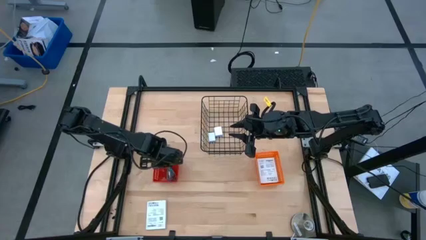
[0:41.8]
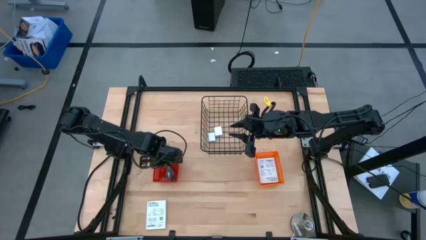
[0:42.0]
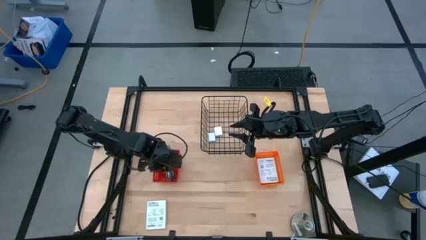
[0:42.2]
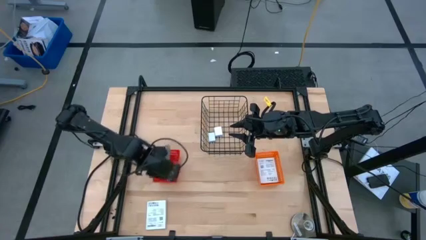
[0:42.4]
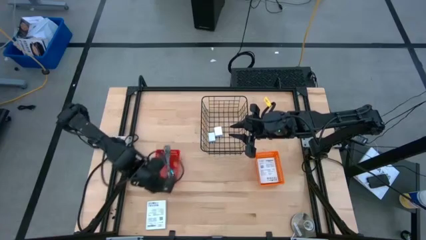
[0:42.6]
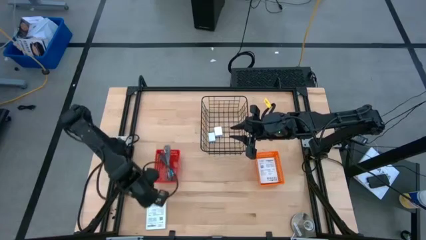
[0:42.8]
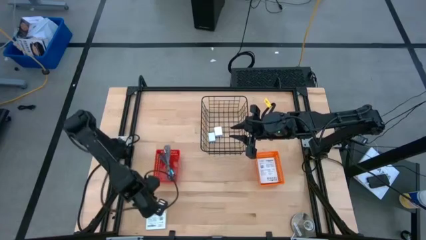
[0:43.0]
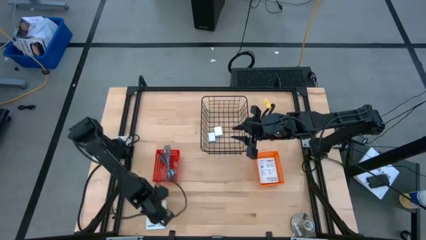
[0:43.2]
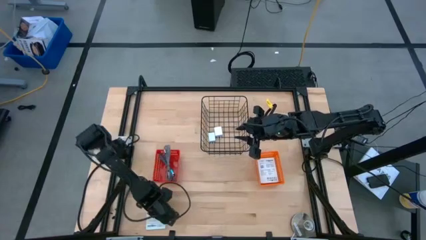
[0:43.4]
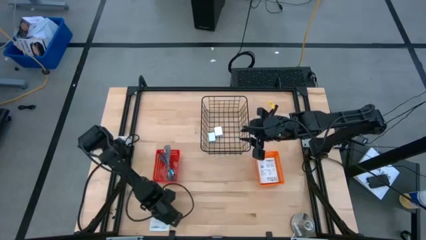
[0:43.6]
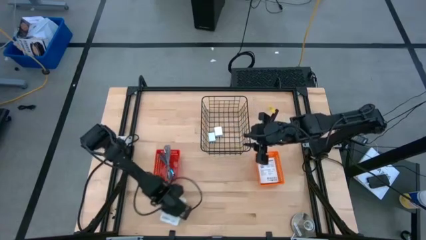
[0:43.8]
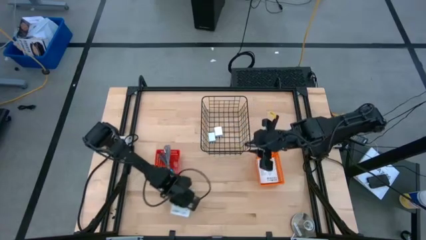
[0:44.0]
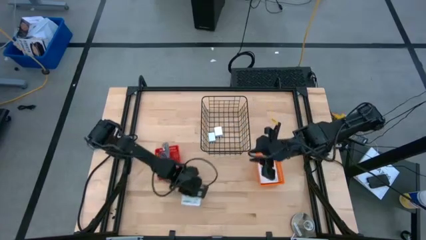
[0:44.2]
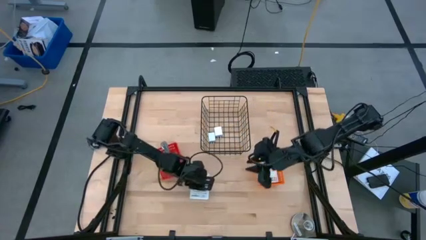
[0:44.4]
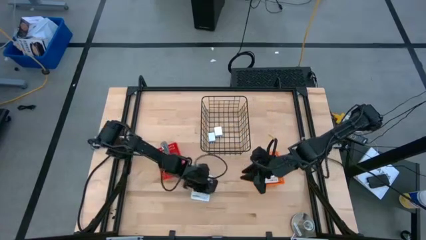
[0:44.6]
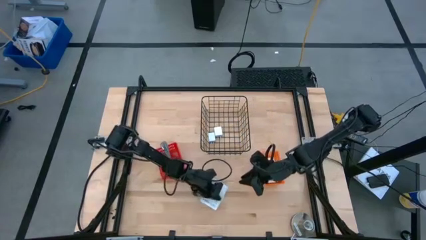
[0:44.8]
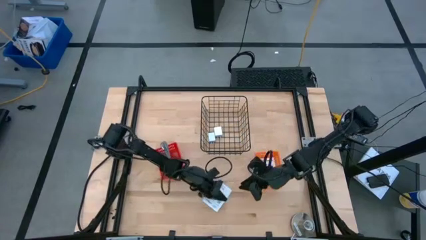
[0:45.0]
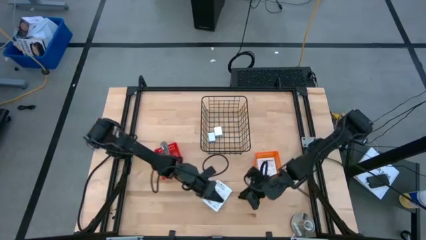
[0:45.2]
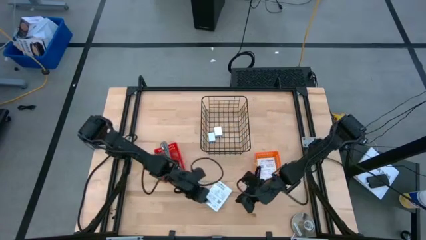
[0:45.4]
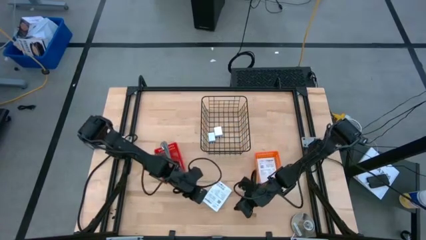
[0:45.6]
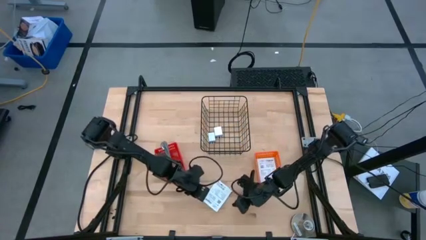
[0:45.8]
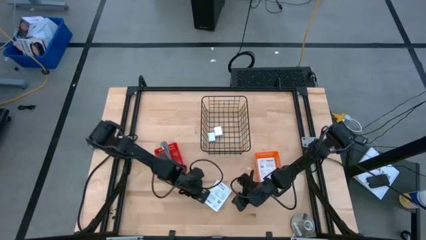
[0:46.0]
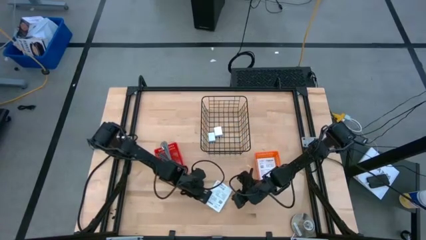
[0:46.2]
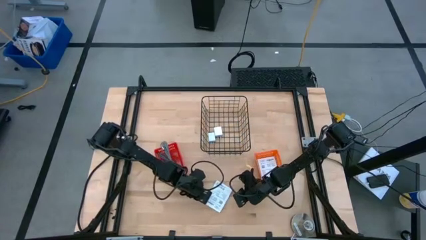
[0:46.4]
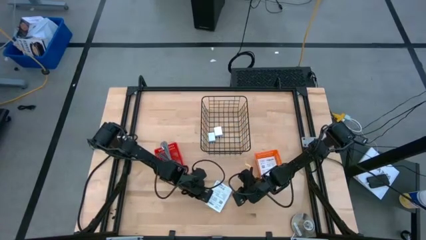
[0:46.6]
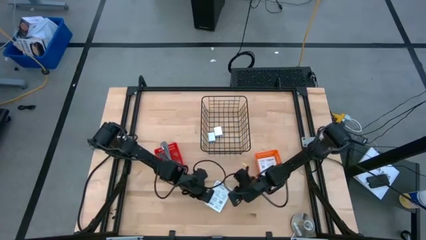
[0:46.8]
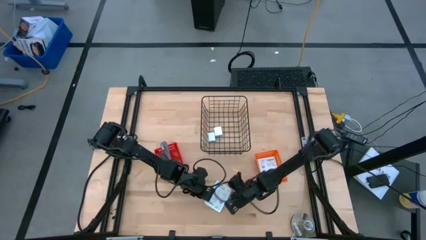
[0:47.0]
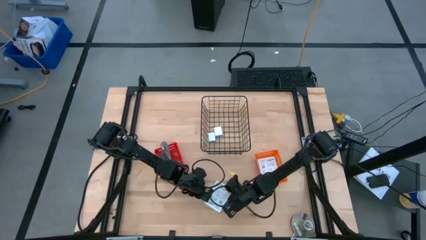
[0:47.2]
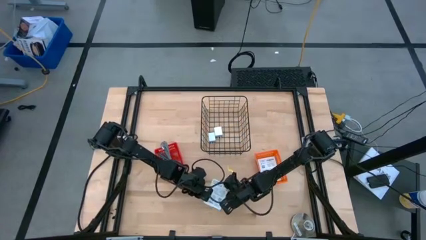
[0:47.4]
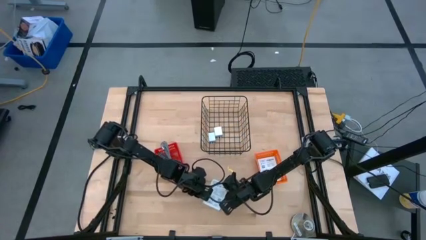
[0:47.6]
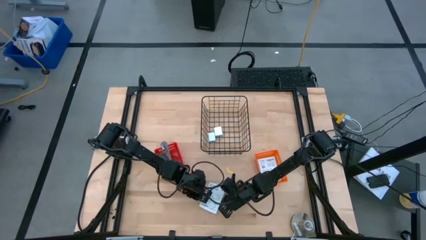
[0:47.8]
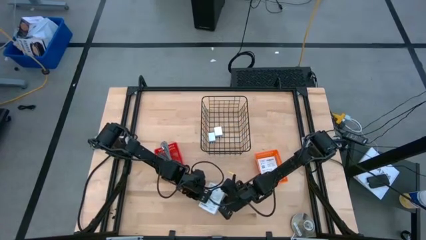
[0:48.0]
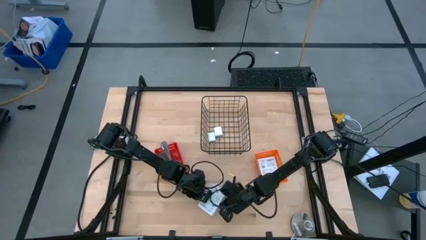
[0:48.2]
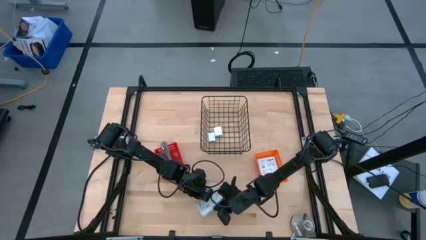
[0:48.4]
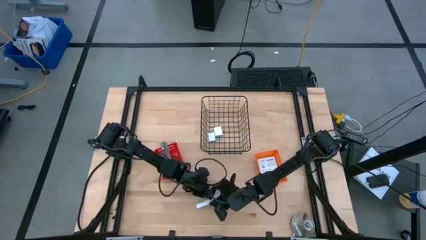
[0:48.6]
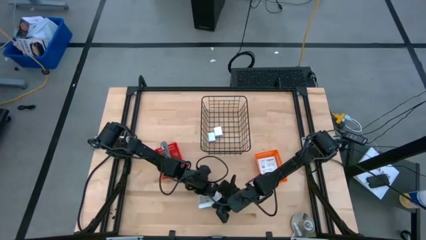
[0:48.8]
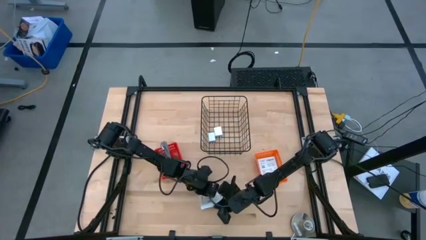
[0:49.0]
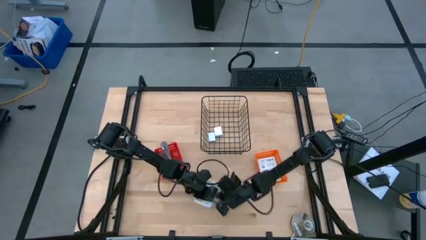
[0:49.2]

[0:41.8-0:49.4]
Task: Pick and place items into bin
Put the white card reader box into the orange bin

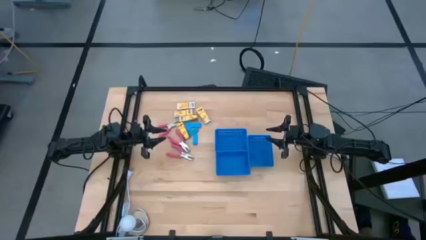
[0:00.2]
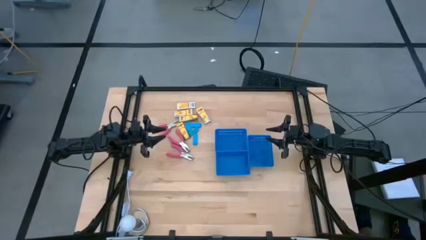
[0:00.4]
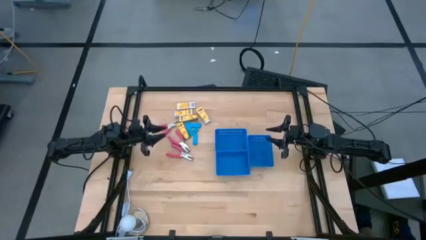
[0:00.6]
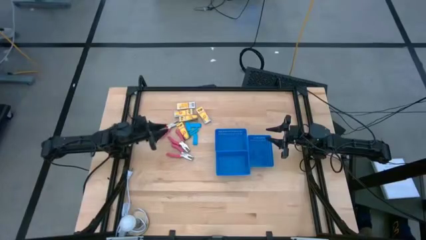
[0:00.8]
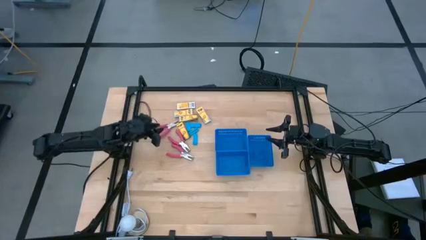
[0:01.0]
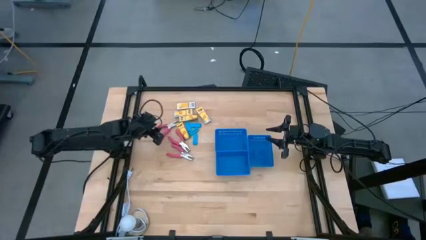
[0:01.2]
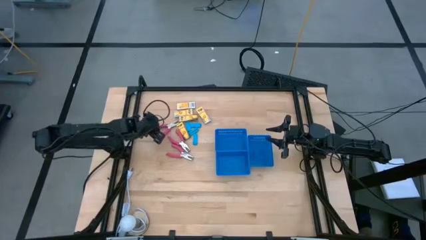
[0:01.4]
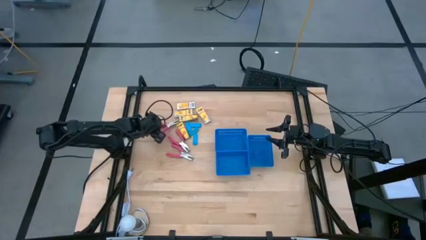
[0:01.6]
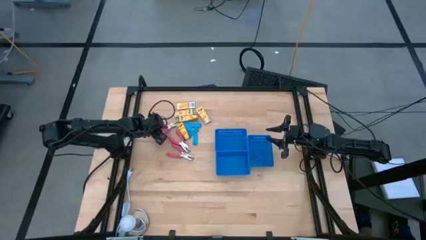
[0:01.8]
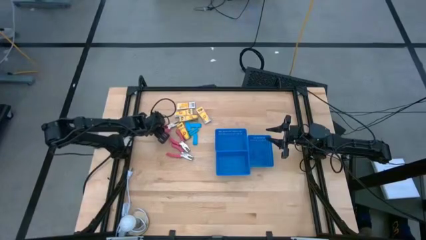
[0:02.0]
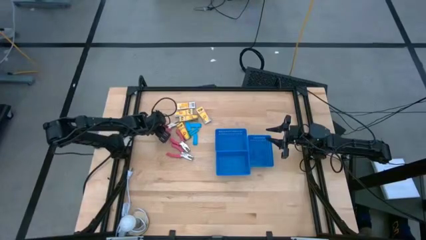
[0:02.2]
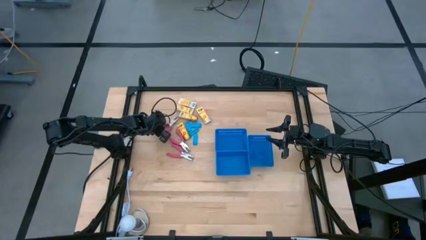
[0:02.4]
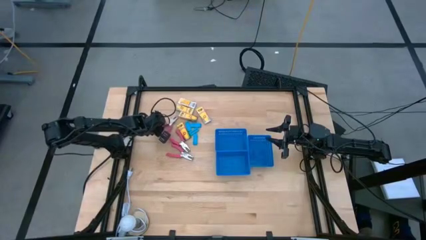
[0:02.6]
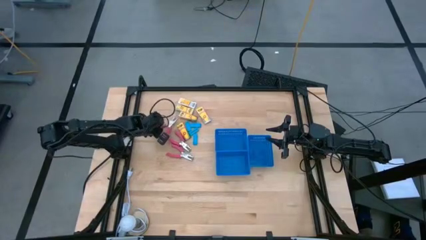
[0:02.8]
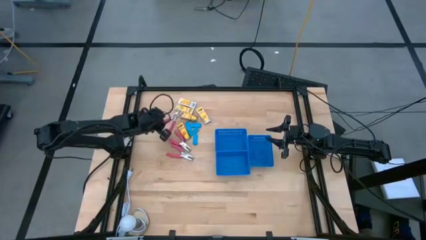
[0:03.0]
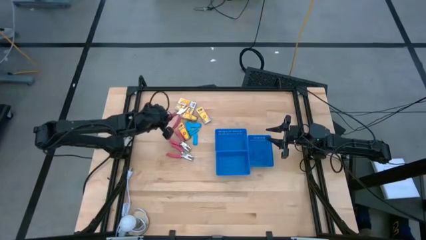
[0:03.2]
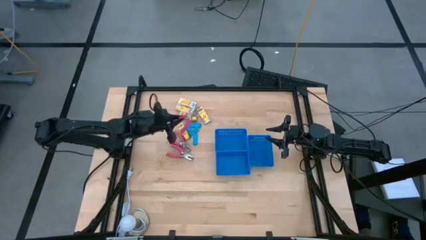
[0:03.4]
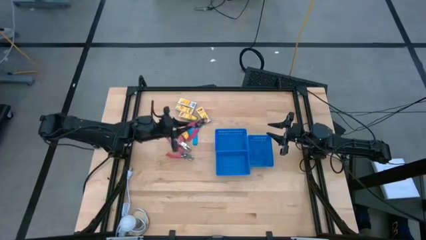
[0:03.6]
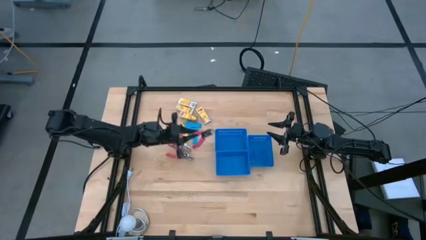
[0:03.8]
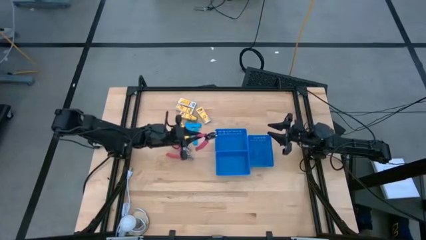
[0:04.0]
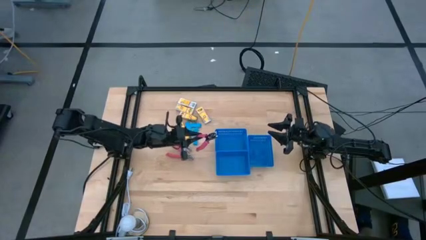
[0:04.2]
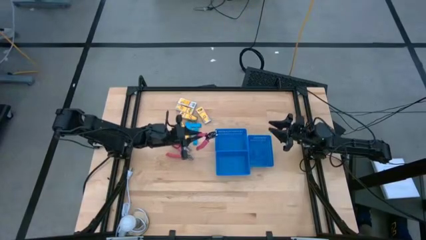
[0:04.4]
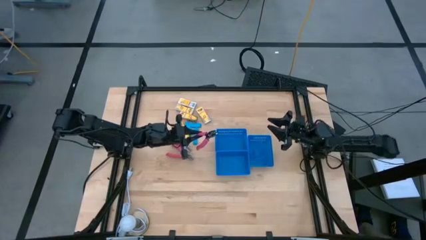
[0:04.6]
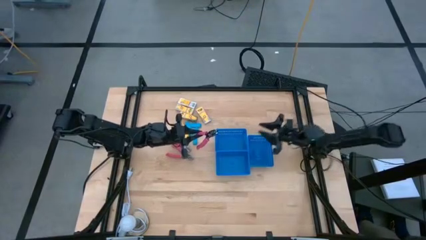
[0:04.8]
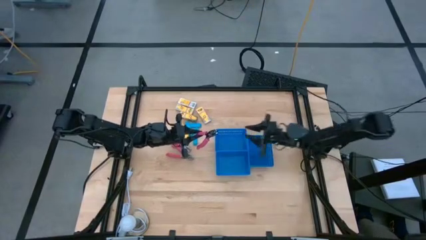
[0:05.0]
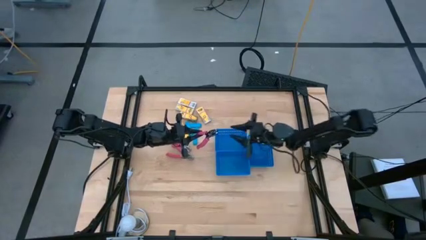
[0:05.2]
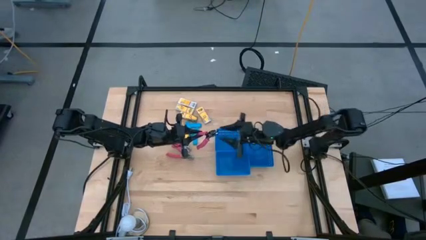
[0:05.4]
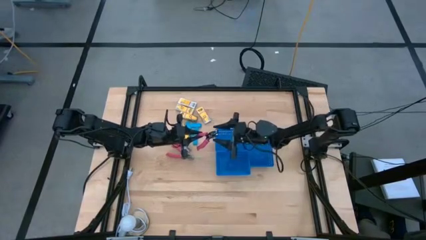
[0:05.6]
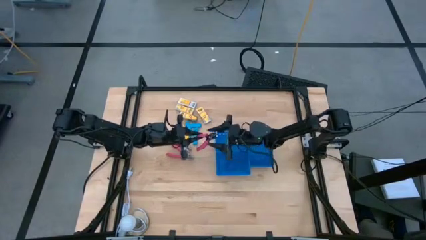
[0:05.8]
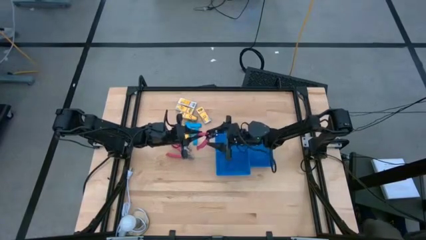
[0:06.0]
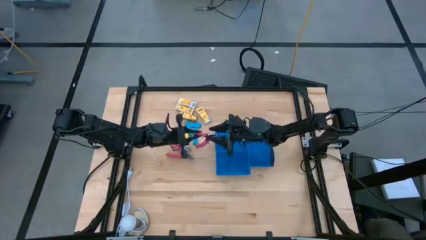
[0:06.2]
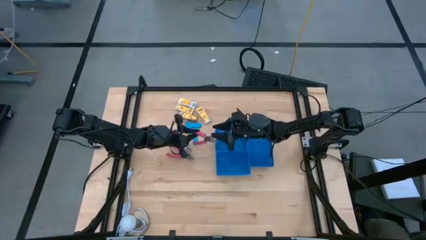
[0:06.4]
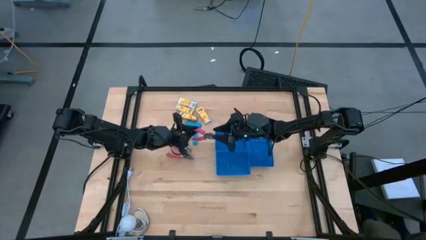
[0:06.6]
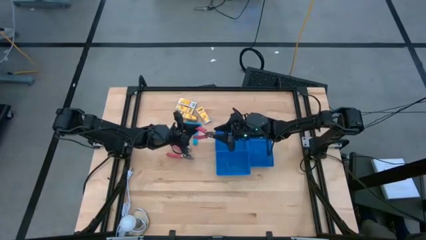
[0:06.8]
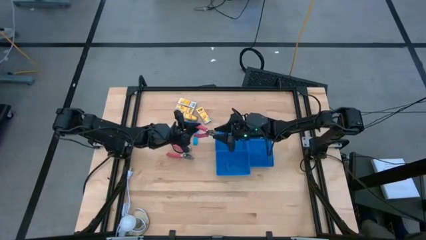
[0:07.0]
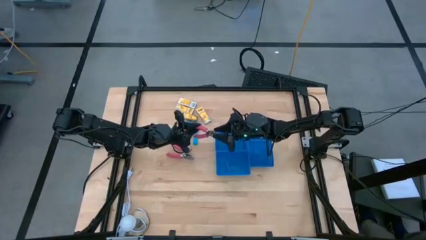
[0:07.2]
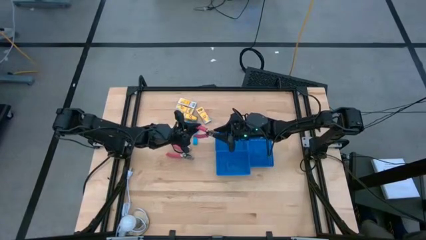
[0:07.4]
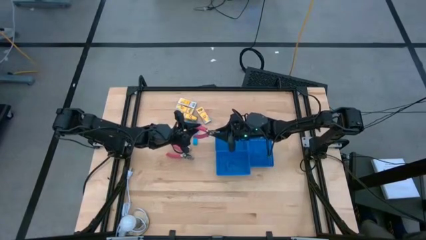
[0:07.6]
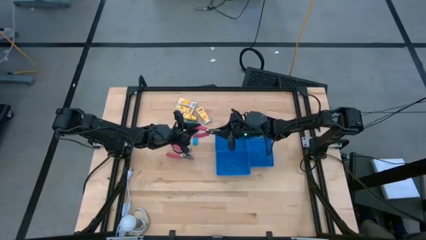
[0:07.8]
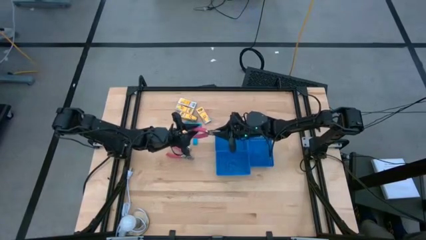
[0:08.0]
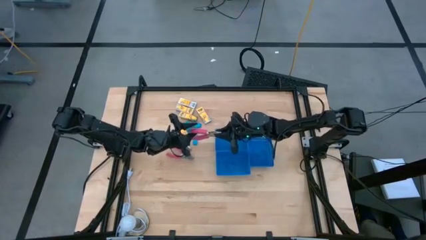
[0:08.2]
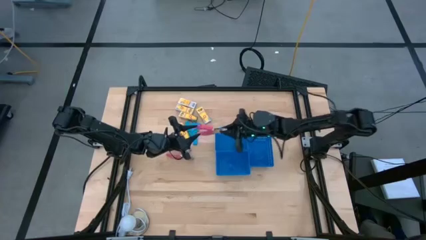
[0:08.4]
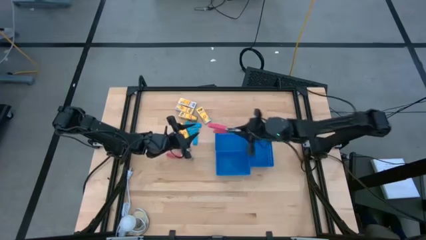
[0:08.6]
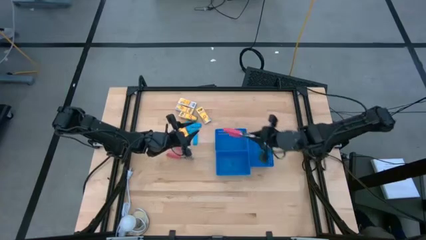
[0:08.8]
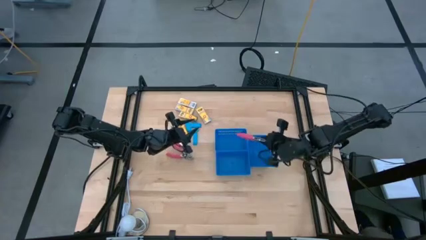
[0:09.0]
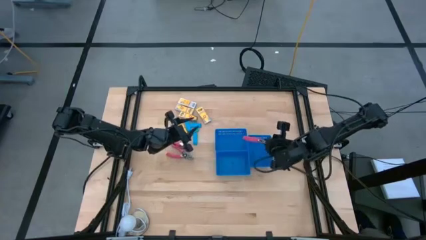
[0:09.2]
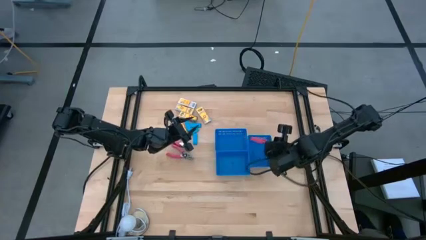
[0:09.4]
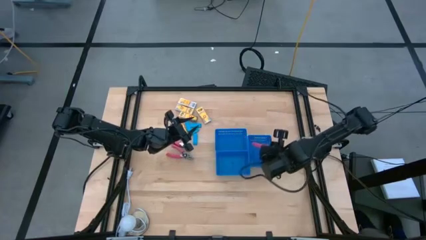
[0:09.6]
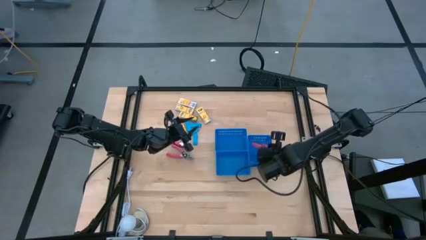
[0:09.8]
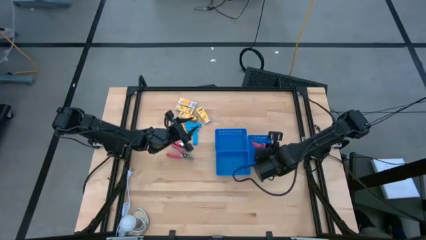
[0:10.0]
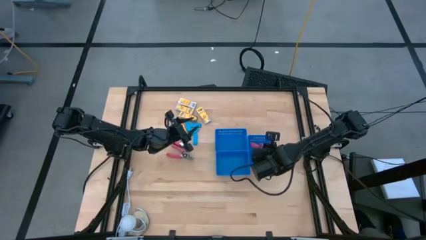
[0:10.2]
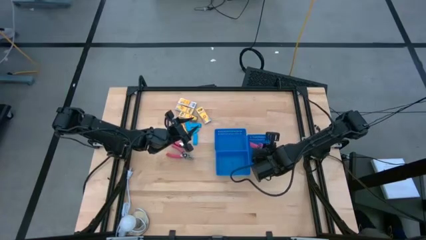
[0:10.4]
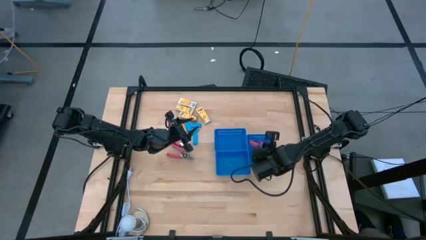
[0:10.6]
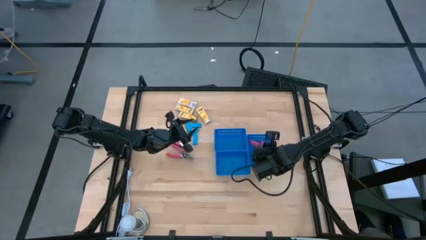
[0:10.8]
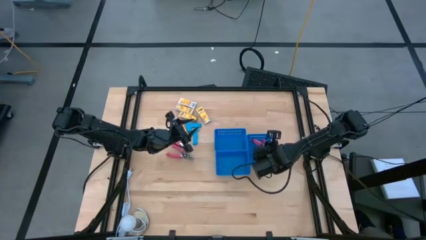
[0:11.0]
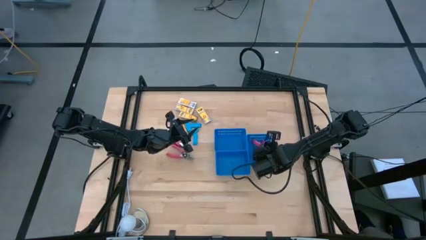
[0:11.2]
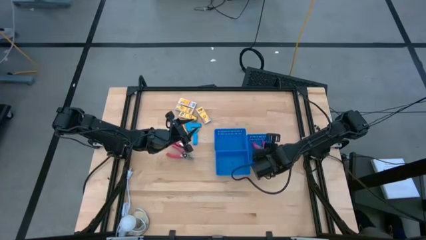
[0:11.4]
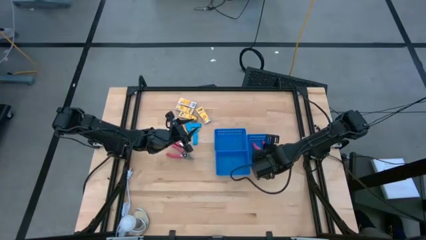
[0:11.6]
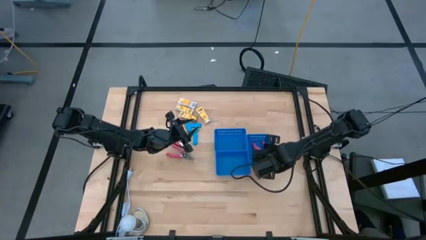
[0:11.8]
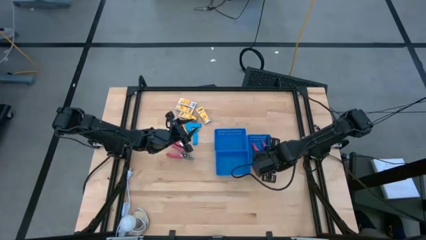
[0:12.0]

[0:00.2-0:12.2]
Task: Pick & Place School Supplies
Put the top pink hole puncher into the right vertical blue bin
